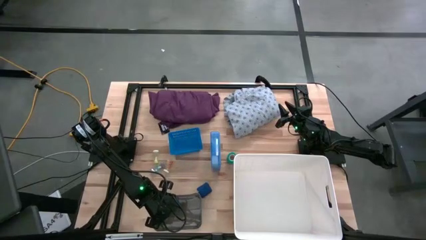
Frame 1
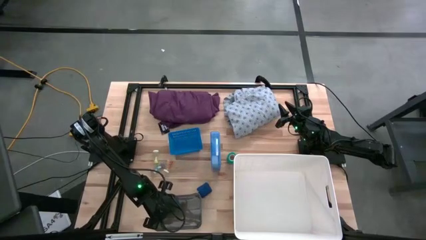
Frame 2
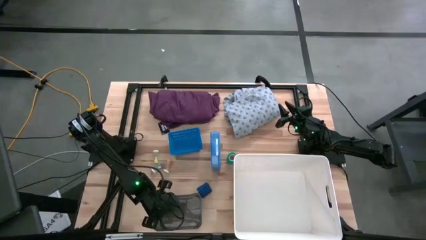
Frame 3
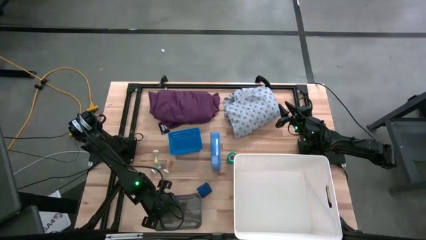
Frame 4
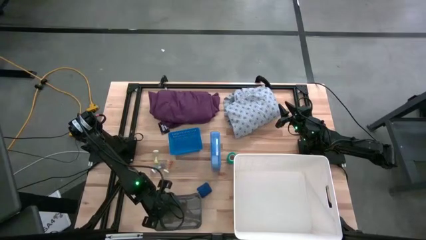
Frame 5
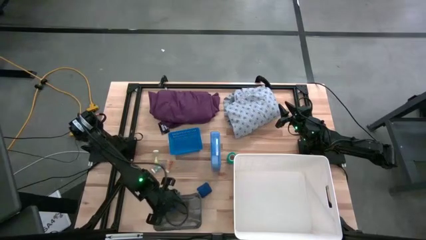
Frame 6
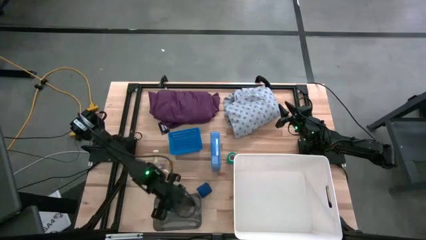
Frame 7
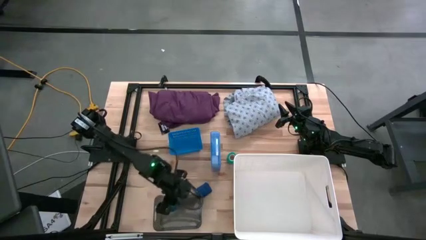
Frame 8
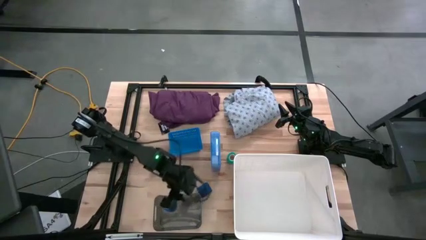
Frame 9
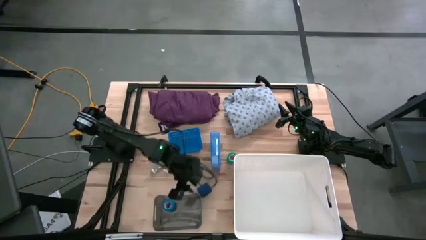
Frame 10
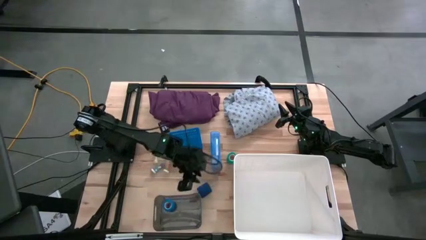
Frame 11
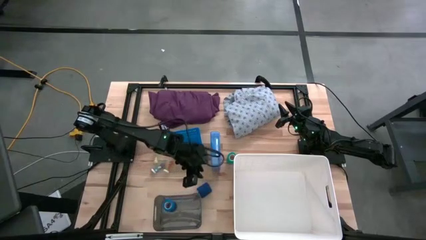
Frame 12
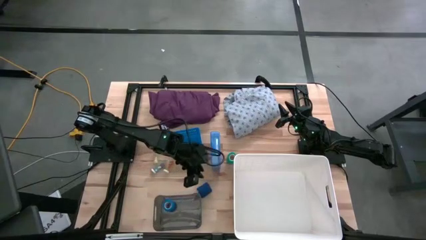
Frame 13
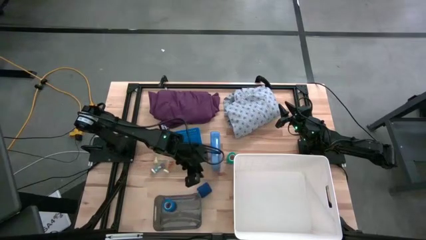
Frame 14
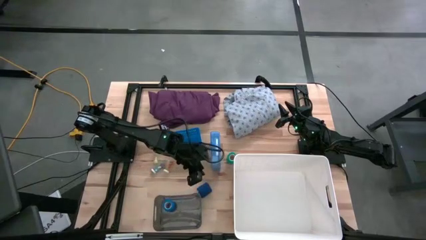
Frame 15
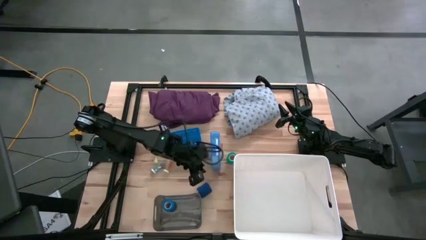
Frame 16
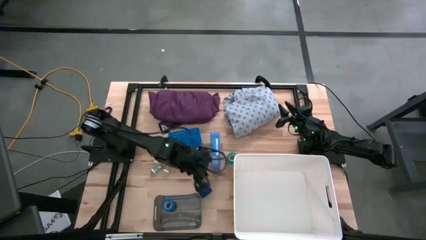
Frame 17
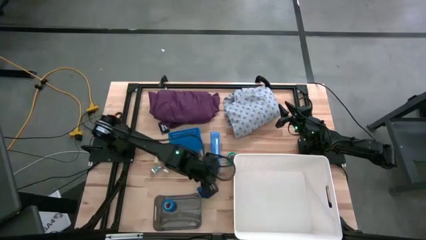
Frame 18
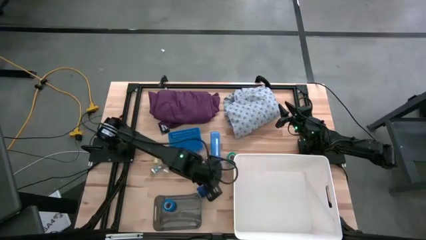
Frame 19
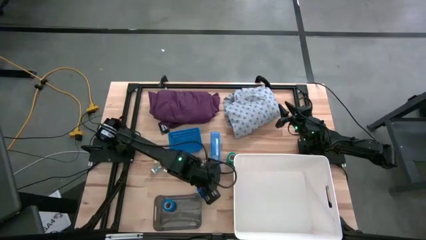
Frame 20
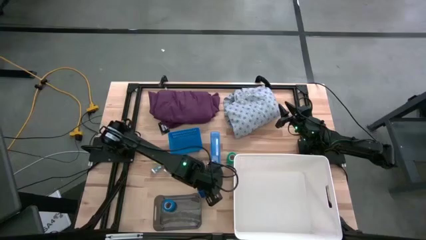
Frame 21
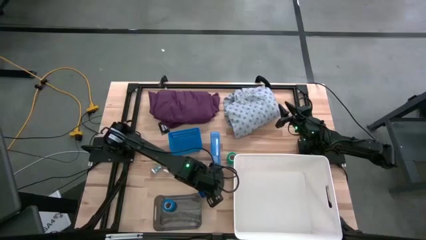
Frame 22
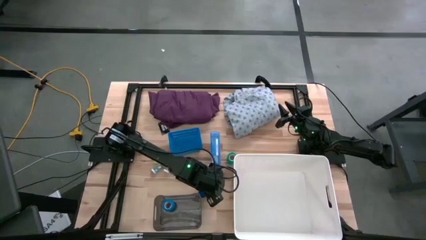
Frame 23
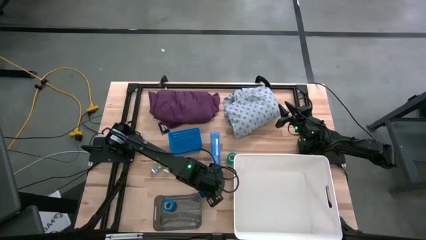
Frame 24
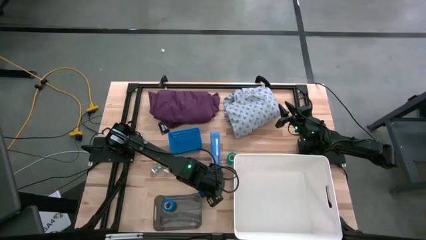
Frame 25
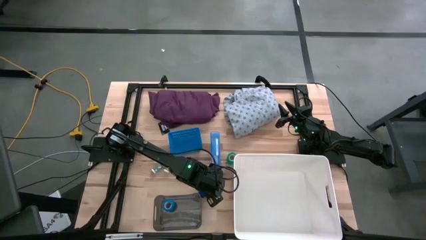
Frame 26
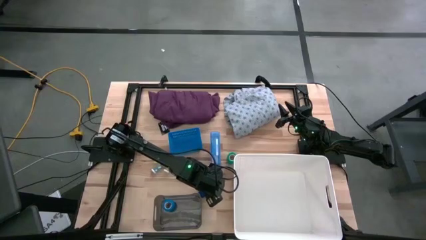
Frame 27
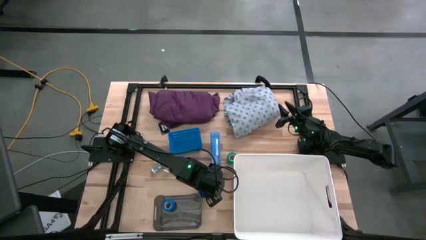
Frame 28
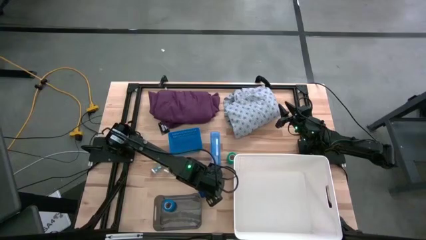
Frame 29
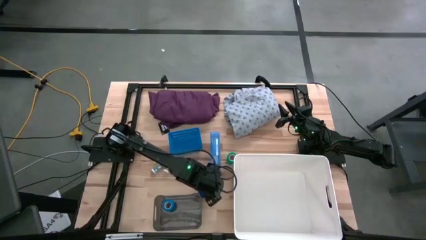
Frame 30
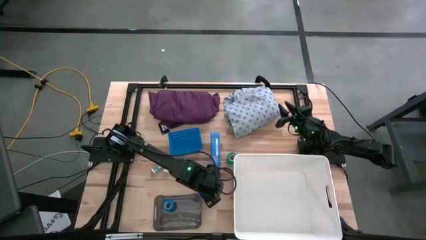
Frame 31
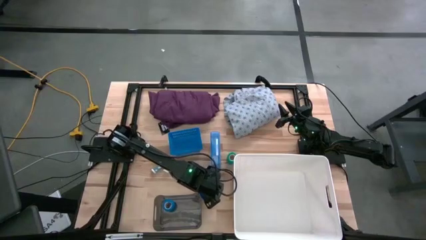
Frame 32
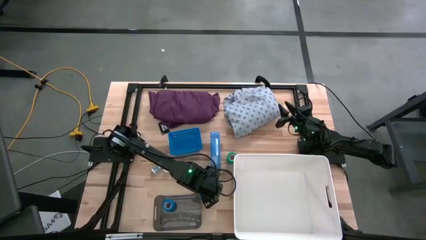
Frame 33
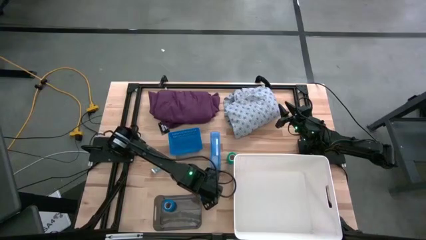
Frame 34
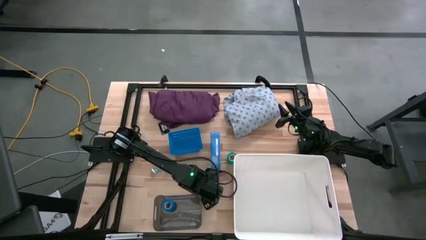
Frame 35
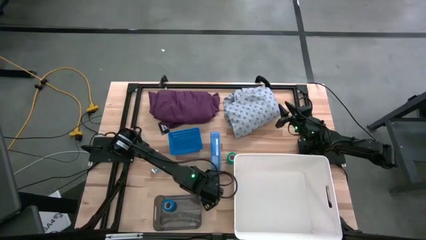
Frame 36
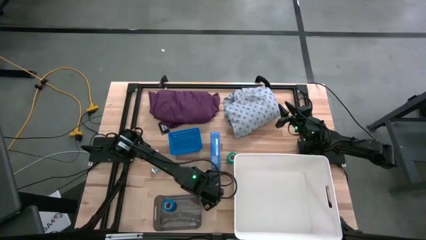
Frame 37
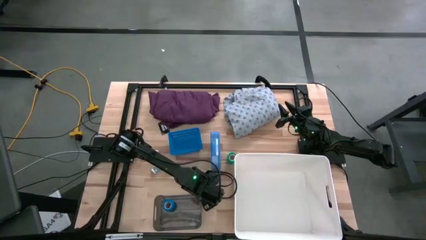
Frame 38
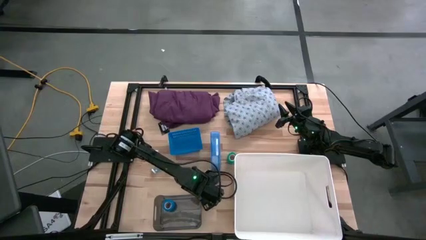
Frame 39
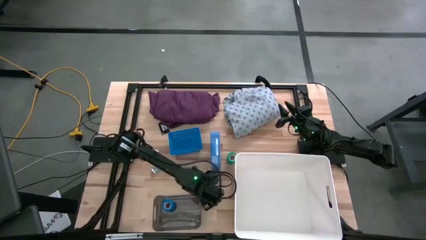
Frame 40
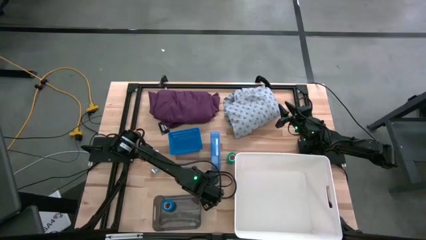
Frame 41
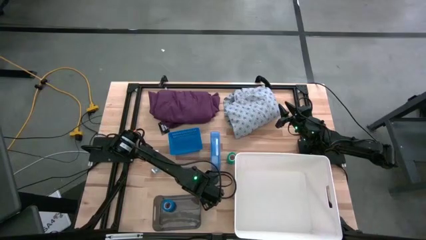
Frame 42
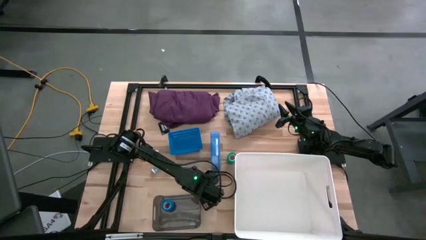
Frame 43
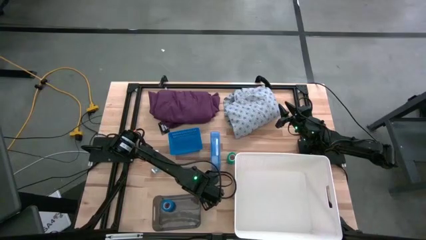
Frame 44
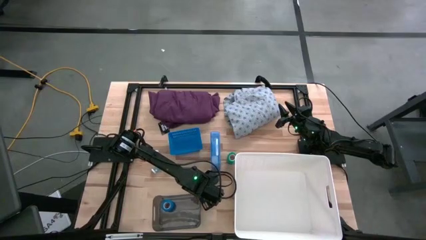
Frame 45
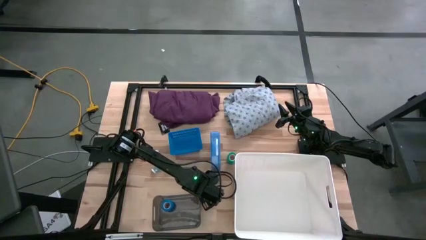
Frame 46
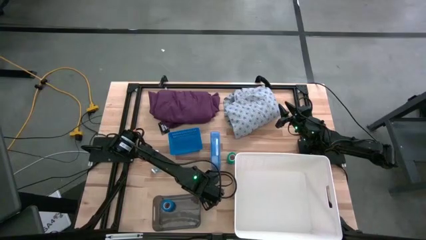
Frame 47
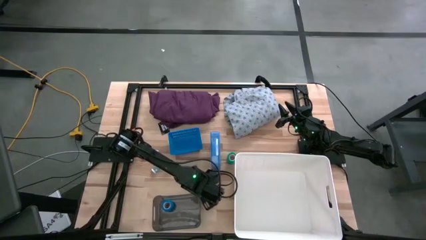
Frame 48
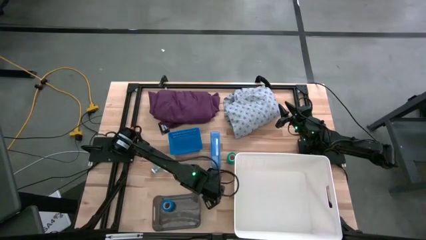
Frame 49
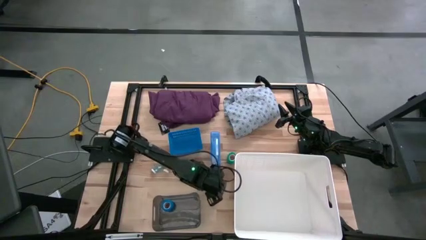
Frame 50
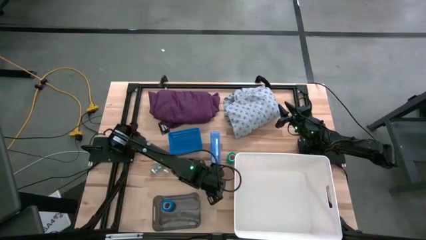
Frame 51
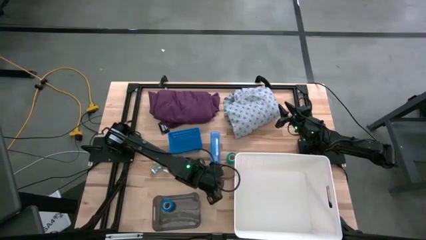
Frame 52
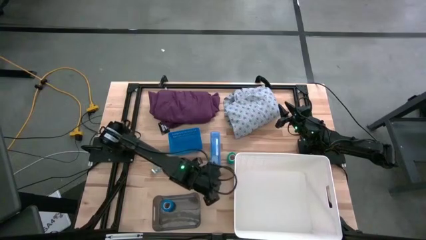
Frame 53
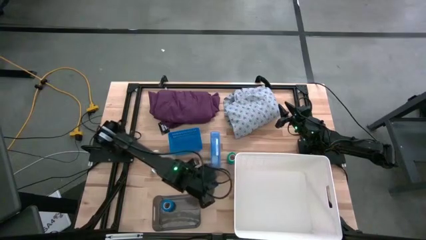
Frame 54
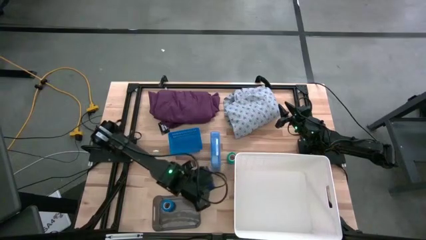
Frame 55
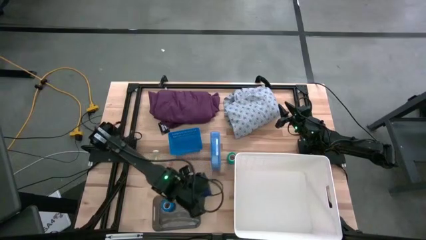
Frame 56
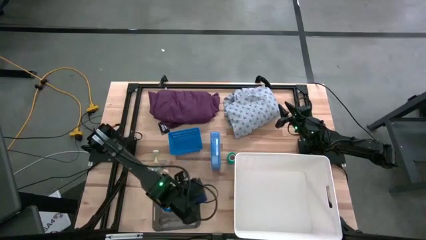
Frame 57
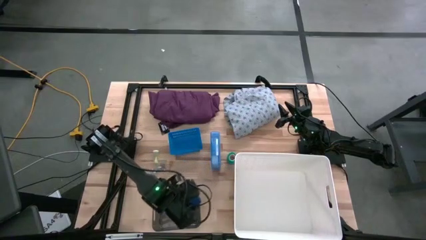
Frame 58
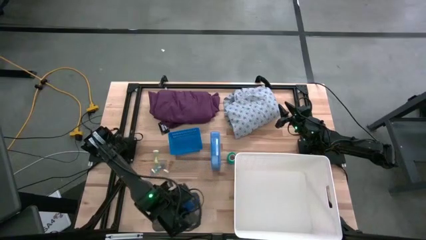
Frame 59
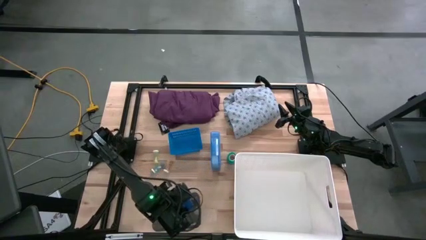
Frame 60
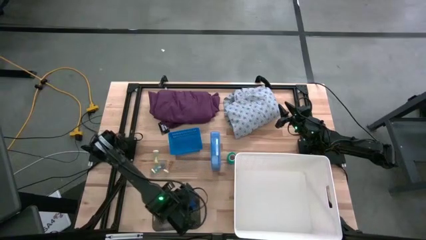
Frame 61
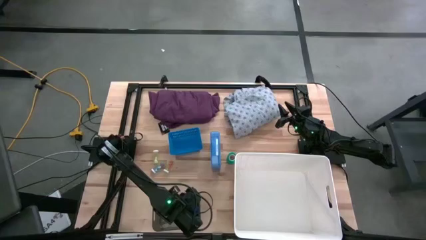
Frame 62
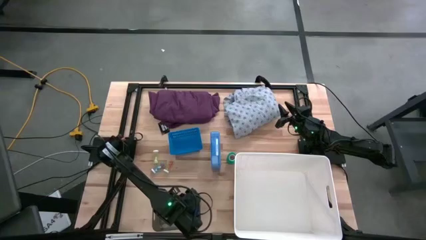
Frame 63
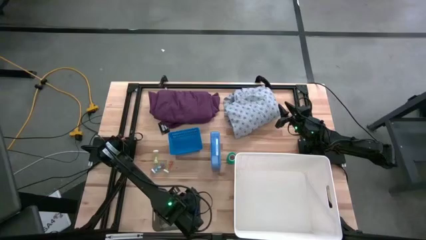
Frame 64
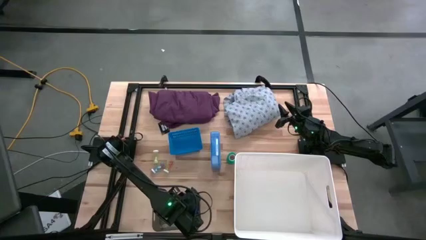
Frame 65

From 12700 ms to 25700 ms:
Task: Pick & Place Medicine items
Put the blue bandage into the black bin
